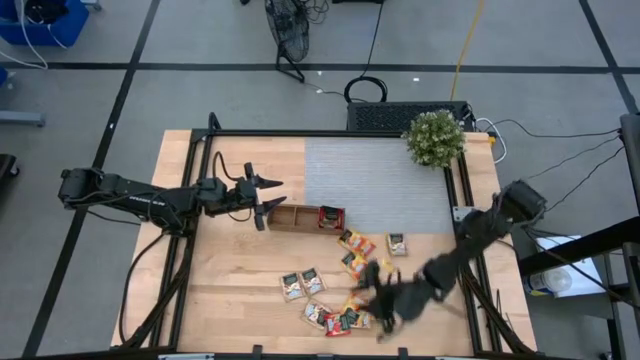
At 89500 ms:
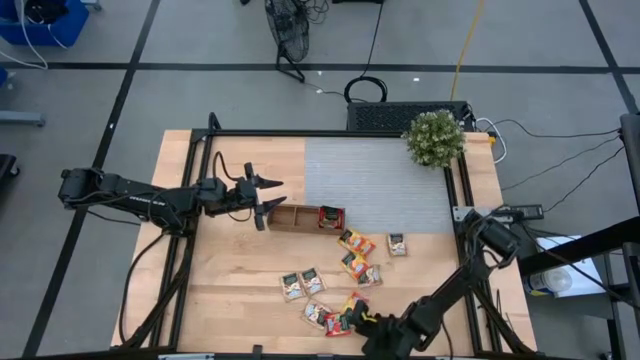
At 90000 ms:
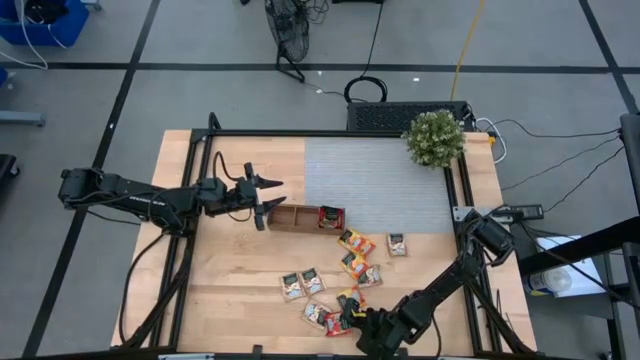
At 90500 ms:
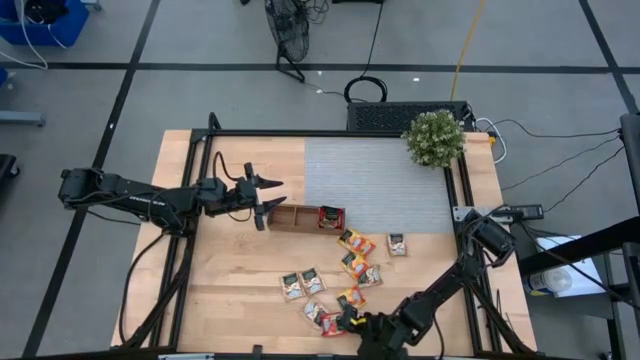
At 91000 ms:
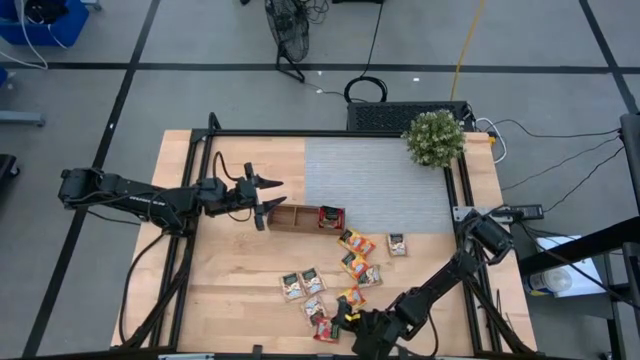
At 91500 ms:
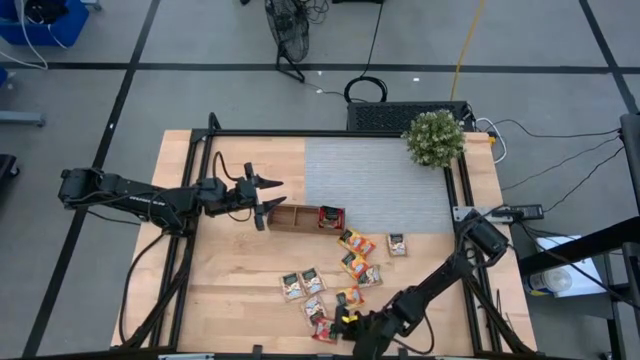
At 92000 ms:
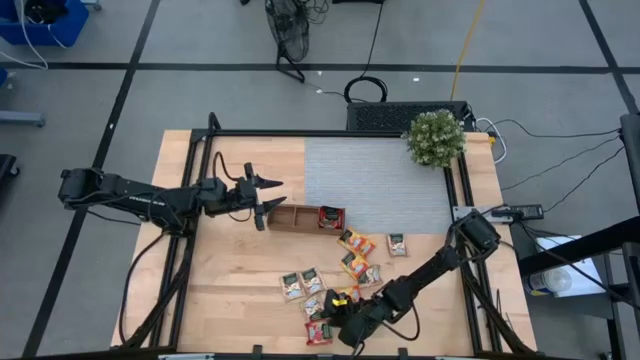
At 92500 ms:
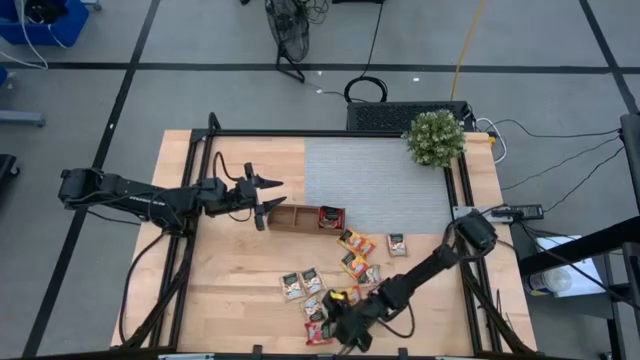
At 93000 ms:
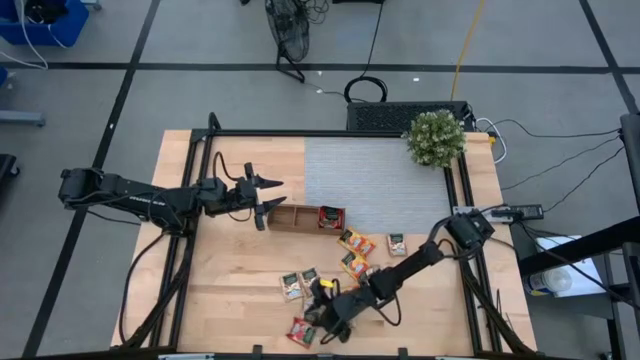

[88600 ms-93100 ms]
Task: Pick & Place Tea
Put the red tea bag into the right section of the wooden organizer

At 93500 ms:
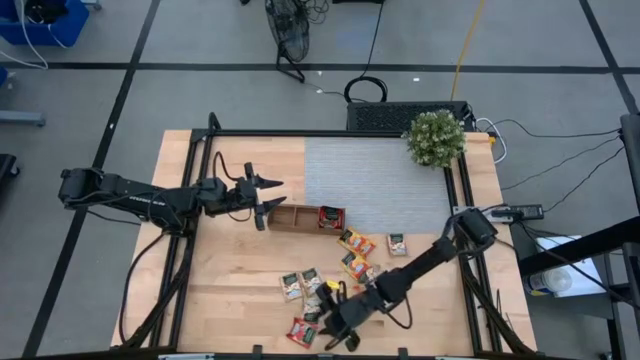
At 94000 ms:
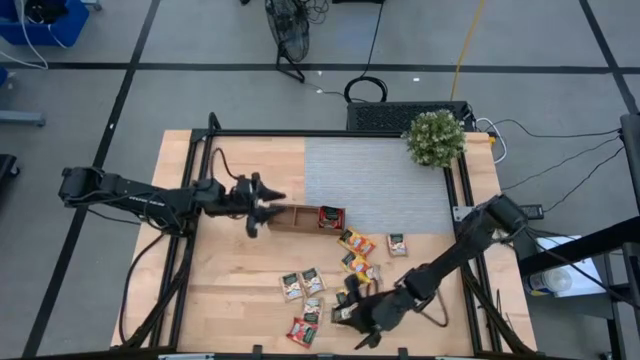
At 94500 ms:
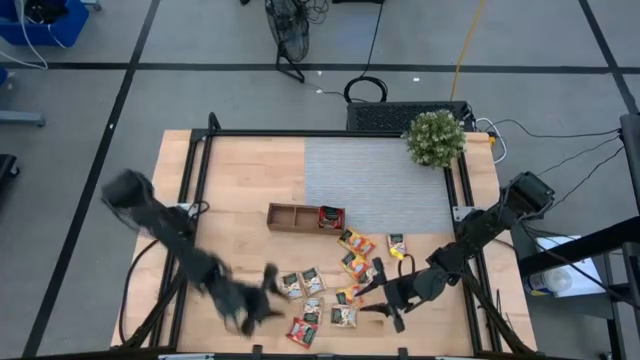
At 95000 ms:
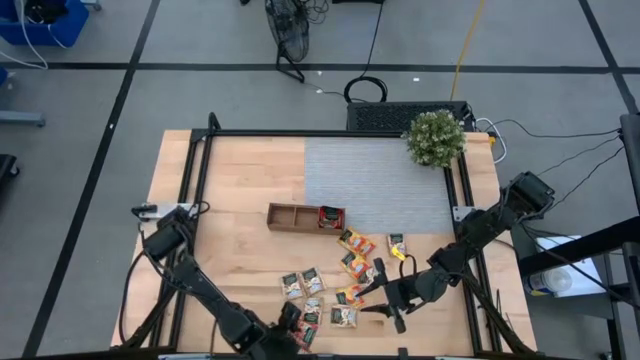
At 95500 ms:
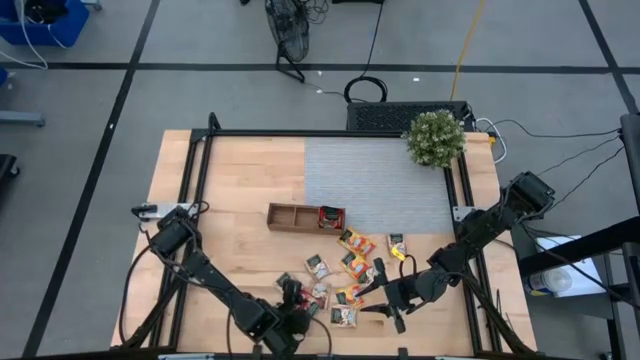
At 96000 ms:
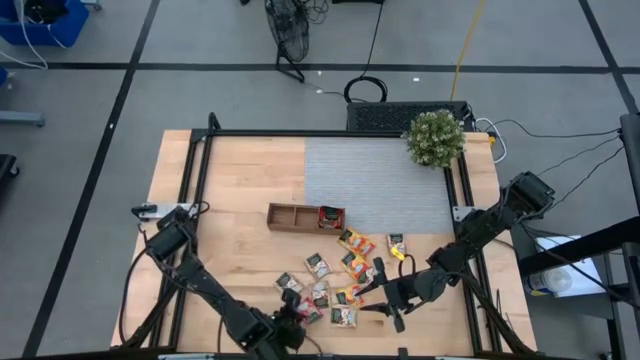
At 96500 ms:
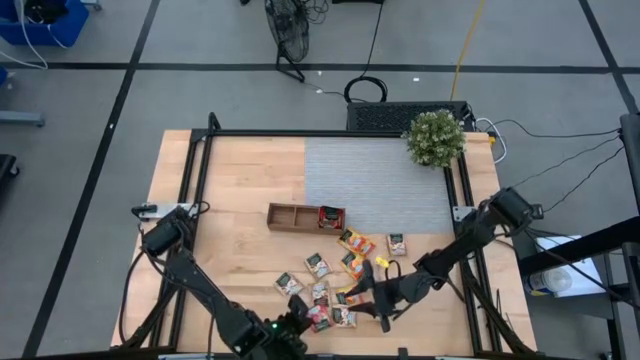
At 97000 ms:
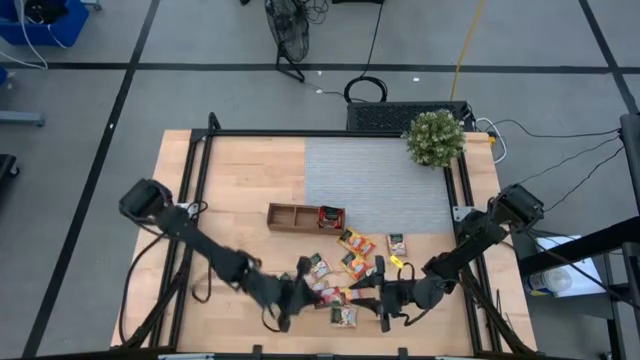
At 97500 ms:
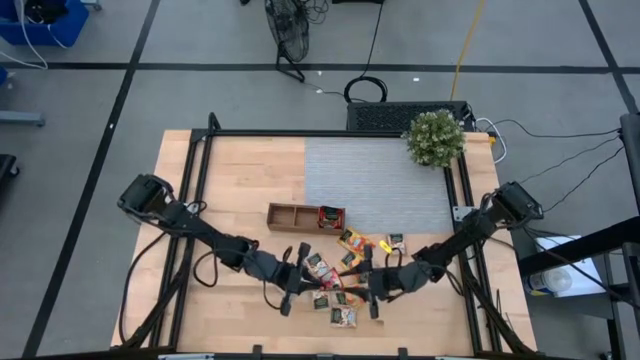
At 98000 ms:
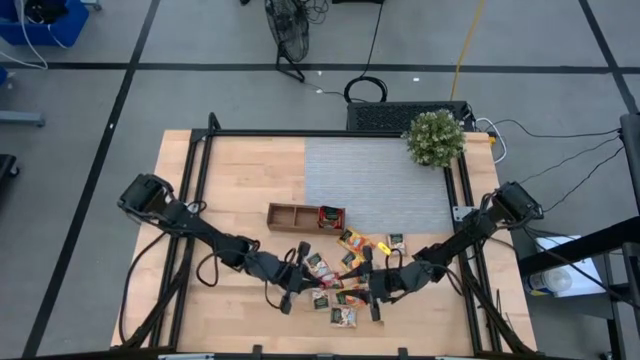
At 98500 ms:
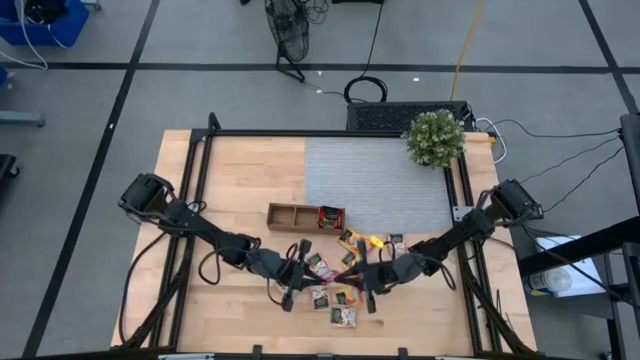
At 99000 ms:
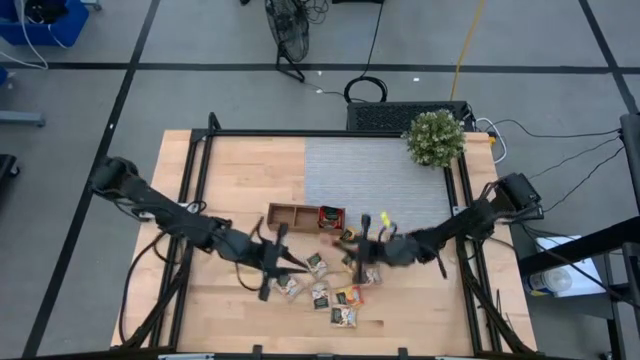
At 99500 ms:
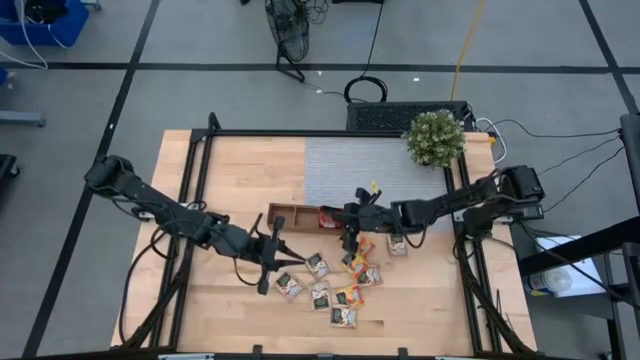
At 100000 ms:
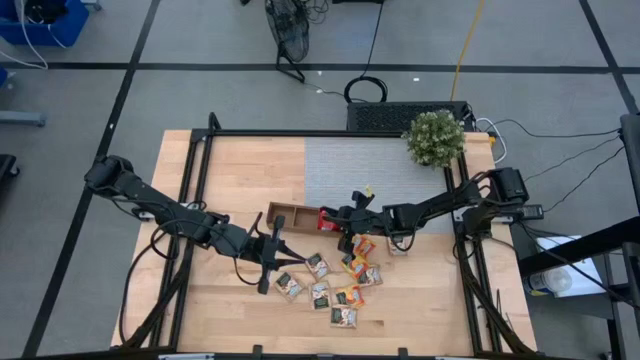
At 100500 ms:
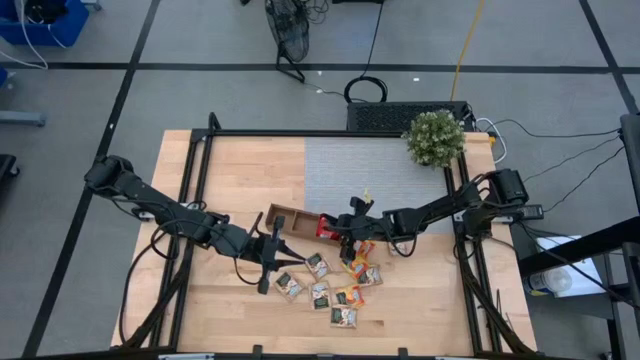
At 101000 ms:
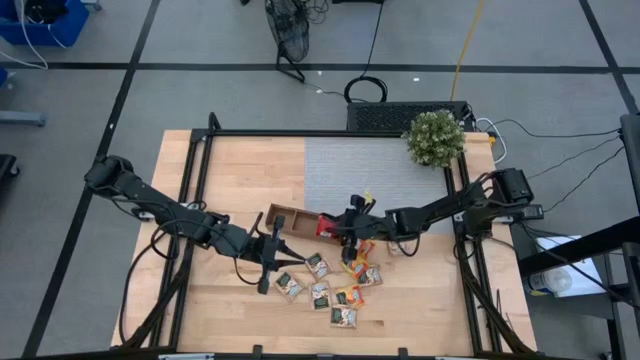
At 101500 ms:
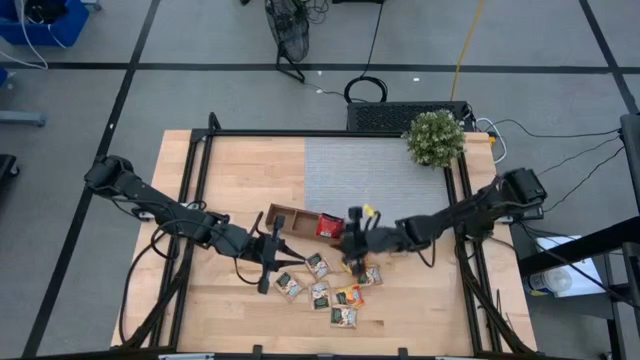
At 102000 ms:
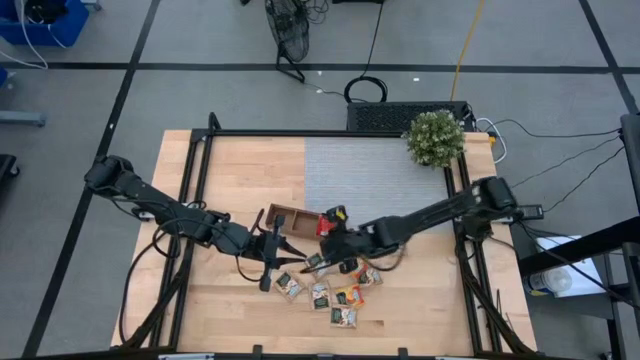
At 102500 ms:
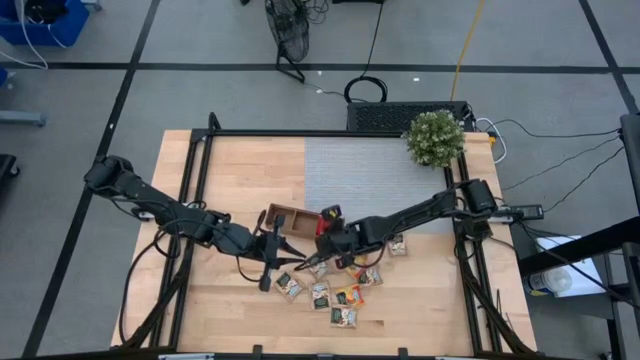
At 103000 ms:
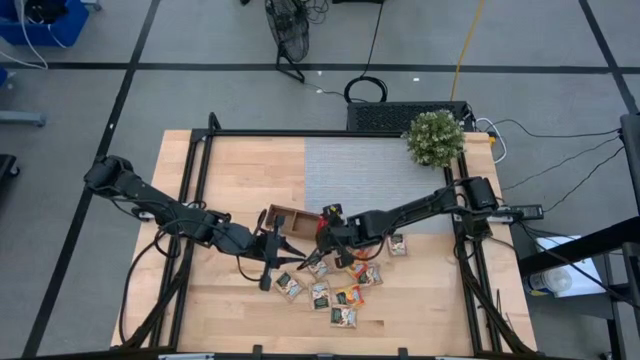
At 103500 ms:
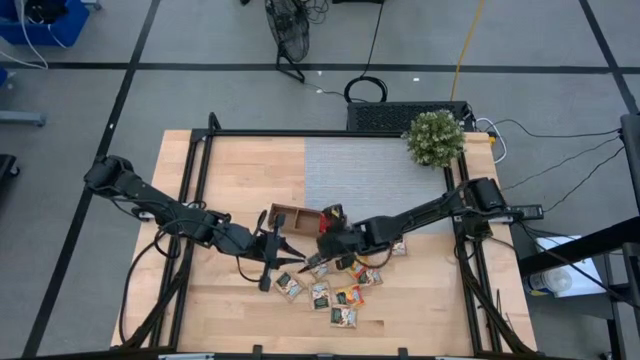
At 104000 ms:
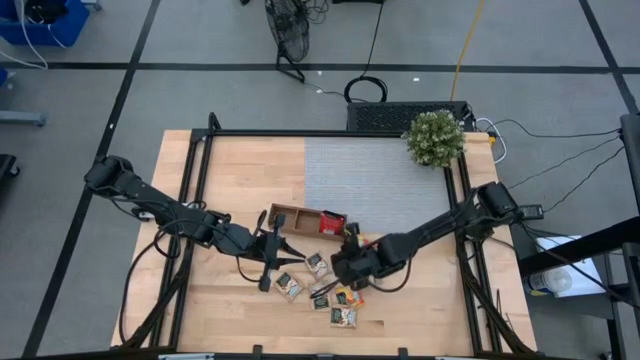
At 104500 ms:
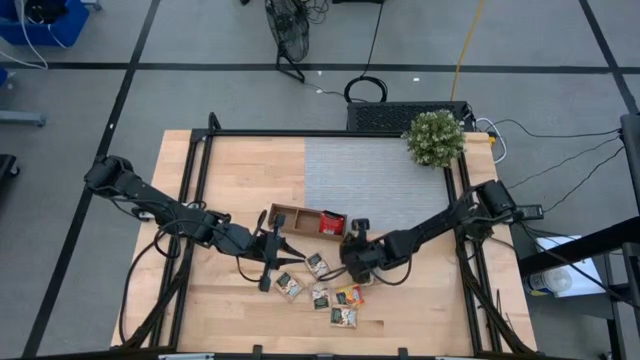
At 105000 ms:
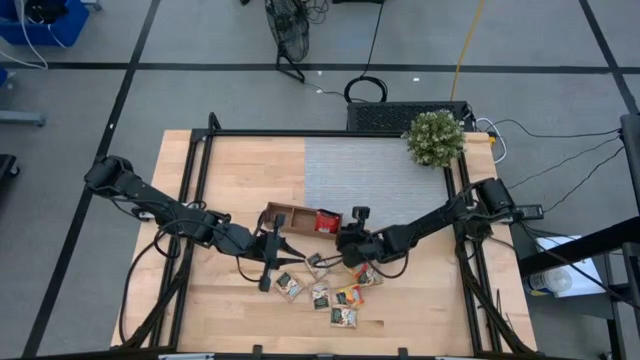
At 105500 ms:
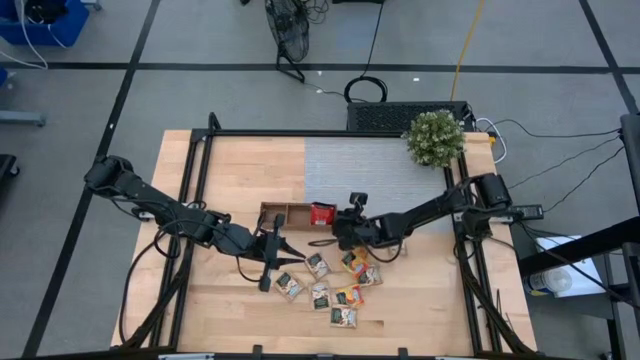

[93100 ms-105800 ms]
Put the red tea bag into the right section of the wooden organizer

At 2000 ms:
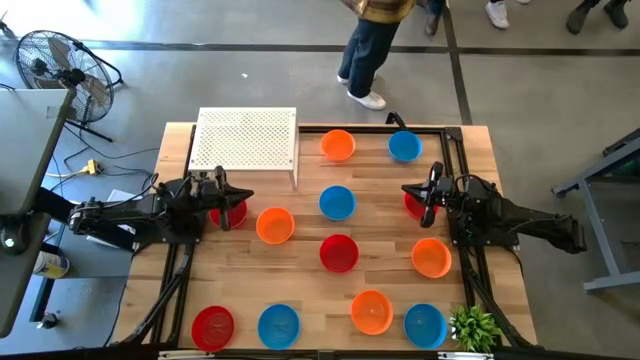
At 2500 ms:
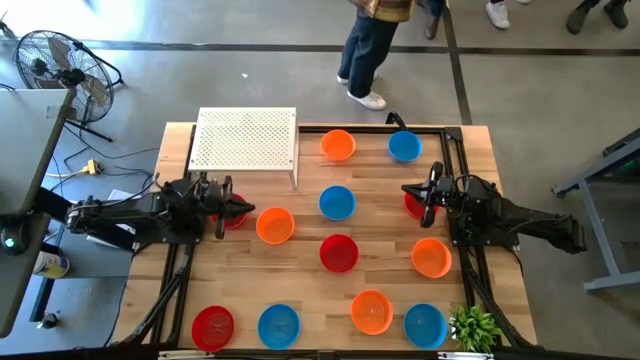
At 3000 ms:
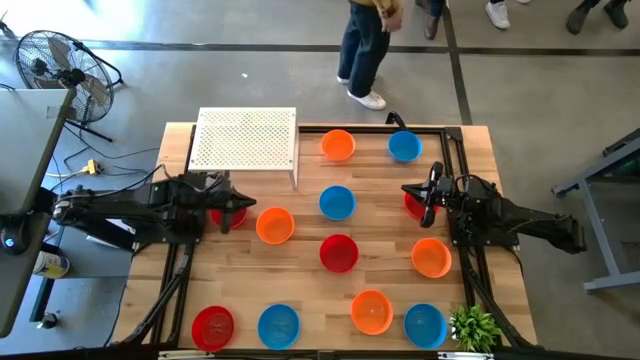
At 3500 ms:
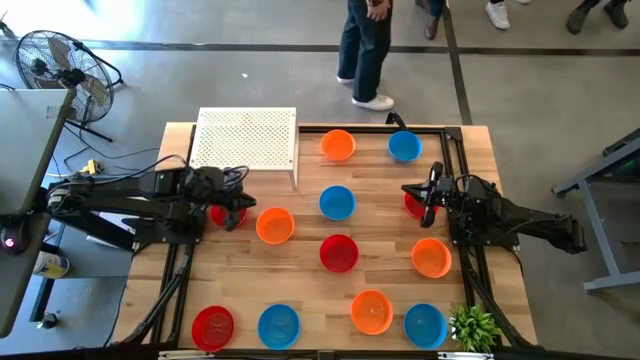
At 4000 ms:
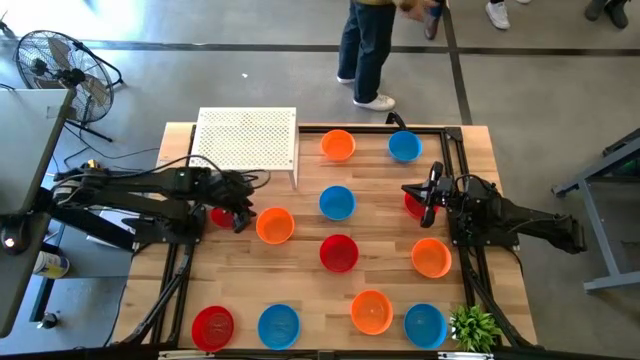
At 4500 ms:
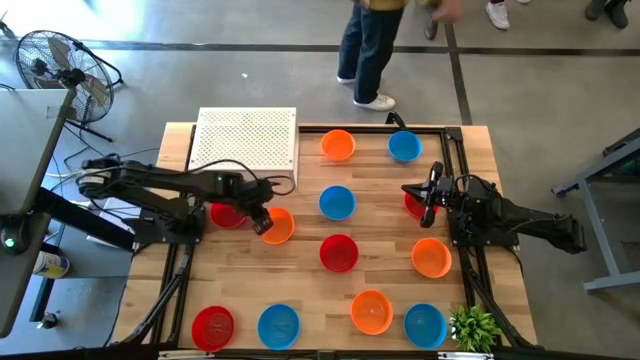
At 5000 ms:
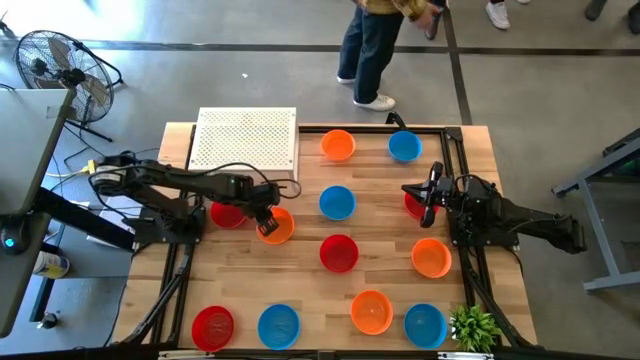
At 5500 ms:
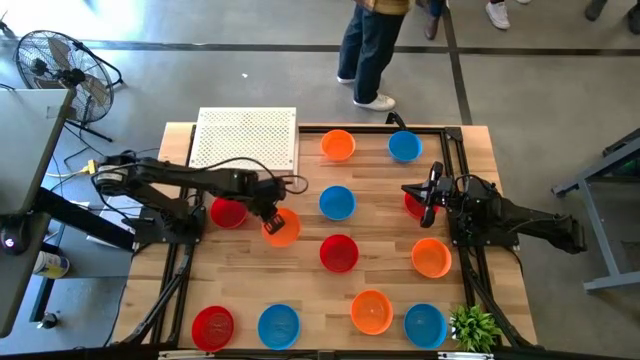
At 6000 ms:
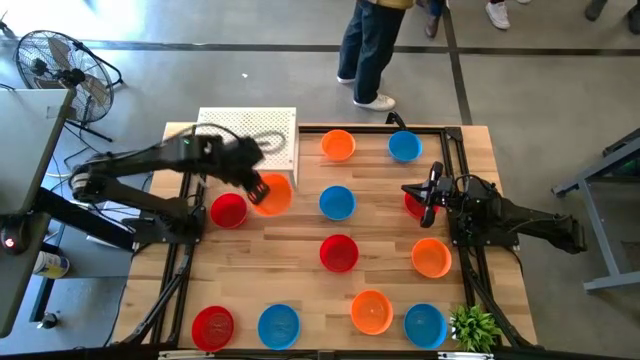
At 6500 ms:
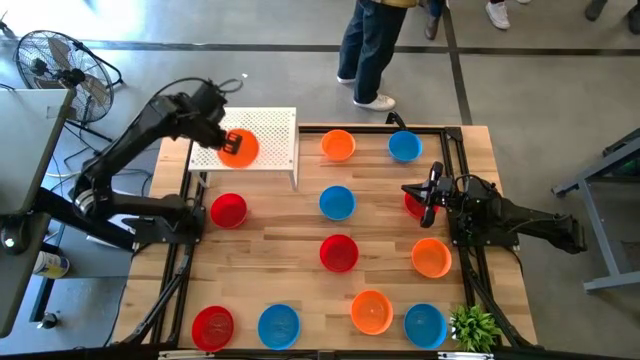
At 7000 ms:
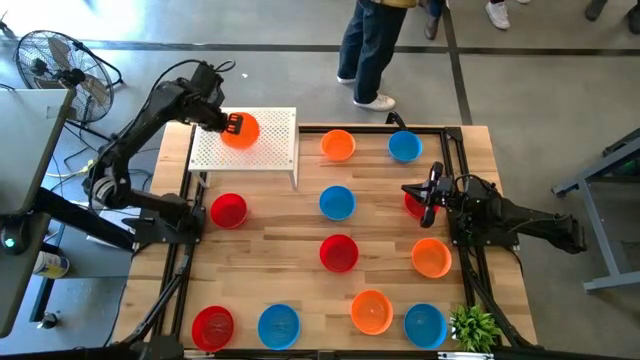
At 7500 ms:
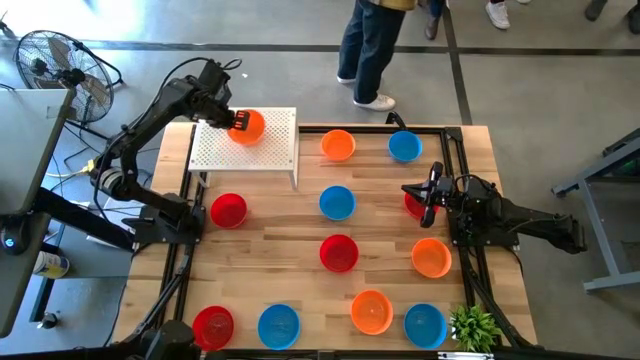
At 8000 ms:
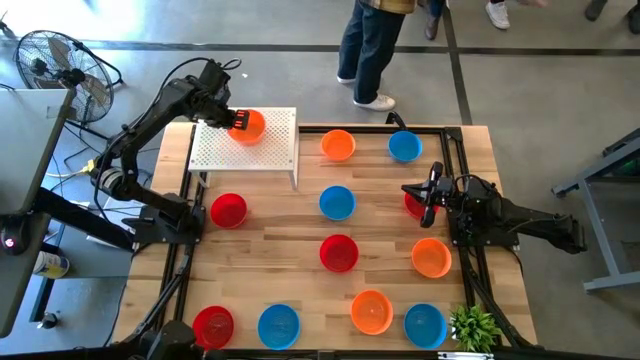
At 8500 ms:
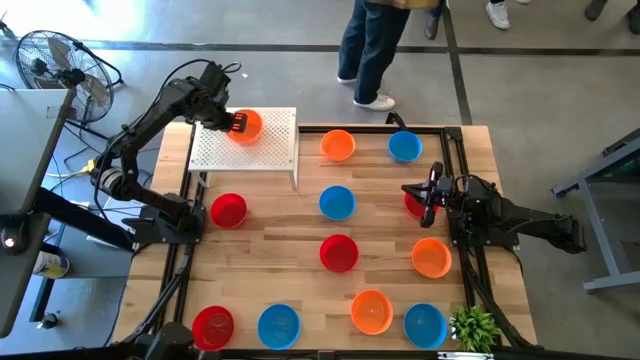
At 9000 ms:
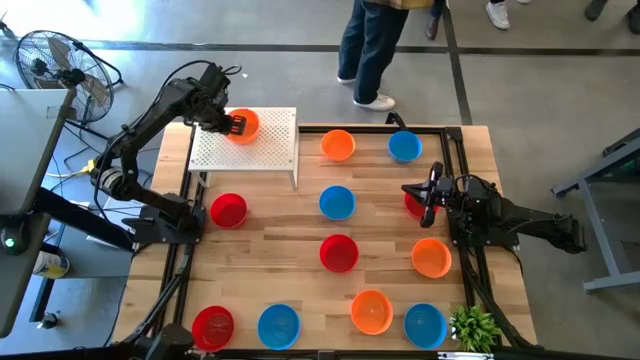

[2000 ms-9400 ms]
Task: Pick & Place Mini bowls
Put the orange bowl on the shelf
